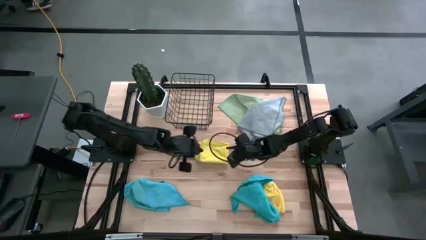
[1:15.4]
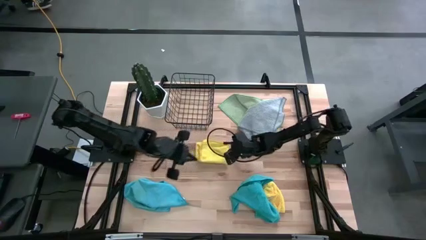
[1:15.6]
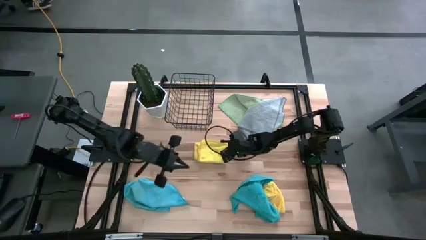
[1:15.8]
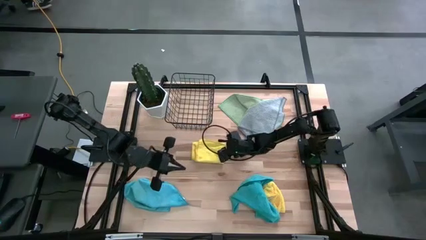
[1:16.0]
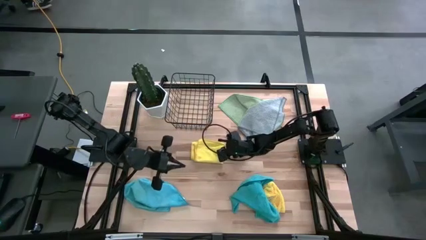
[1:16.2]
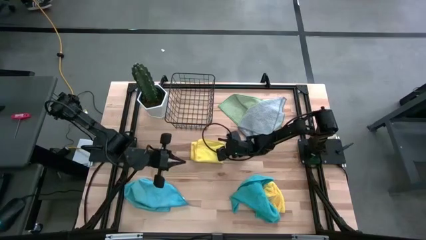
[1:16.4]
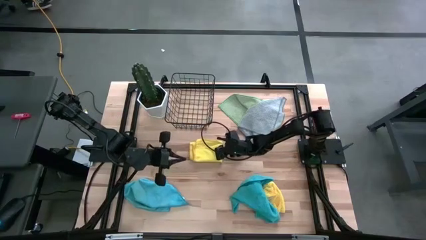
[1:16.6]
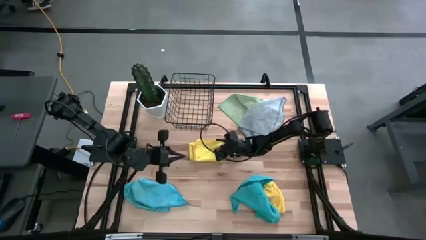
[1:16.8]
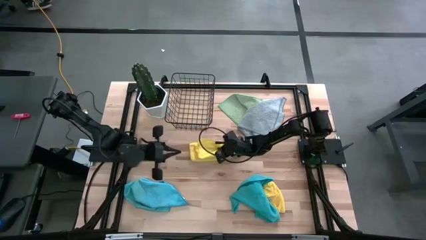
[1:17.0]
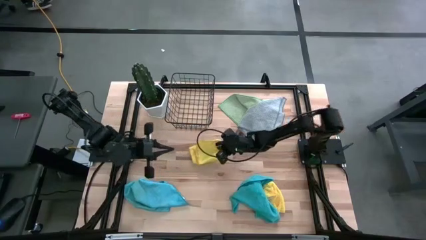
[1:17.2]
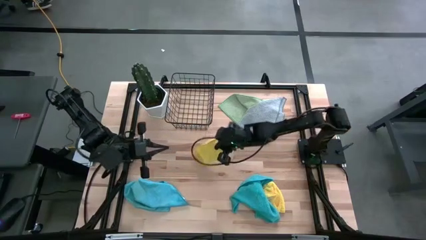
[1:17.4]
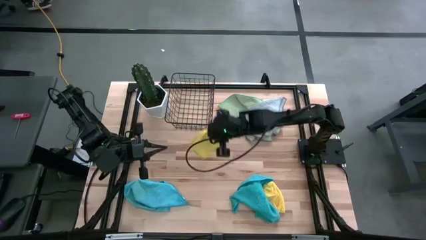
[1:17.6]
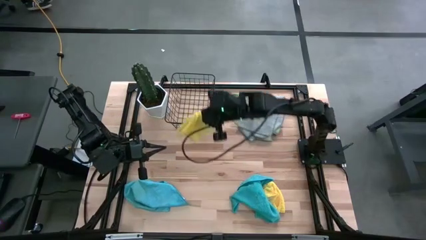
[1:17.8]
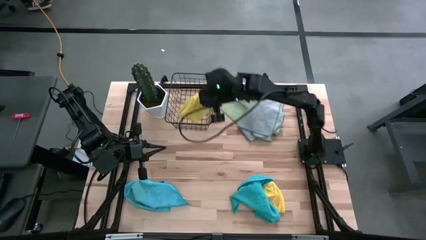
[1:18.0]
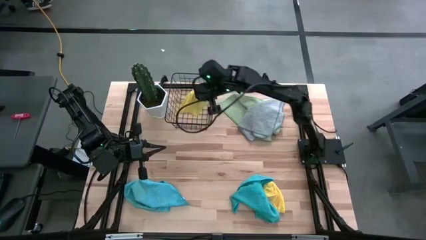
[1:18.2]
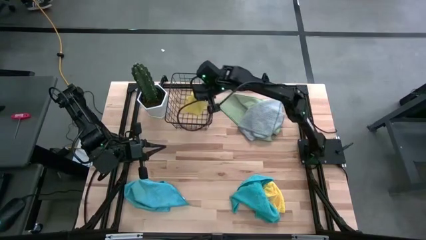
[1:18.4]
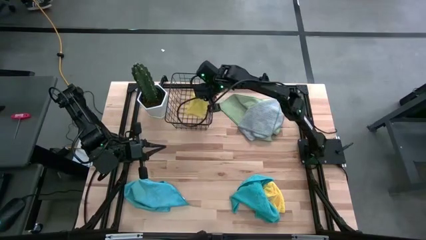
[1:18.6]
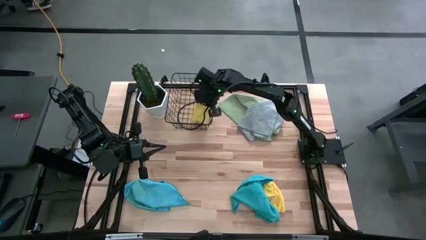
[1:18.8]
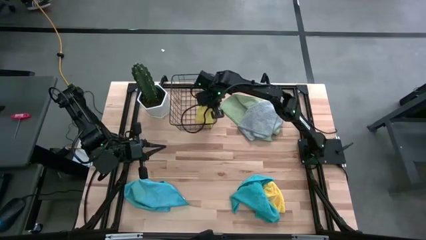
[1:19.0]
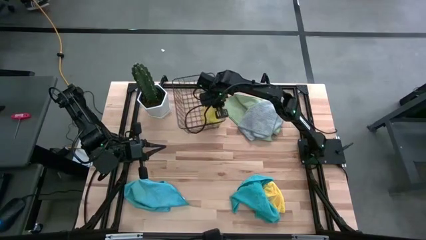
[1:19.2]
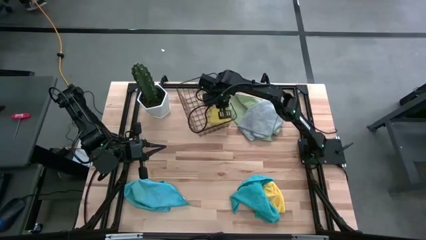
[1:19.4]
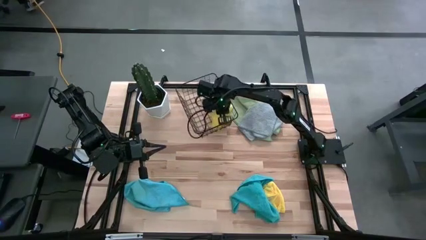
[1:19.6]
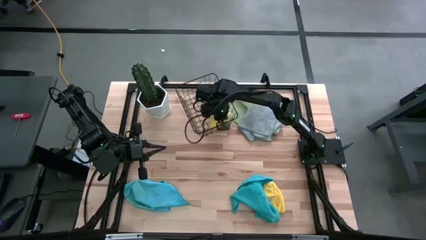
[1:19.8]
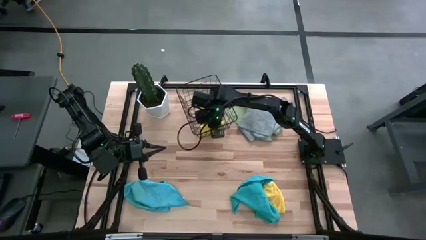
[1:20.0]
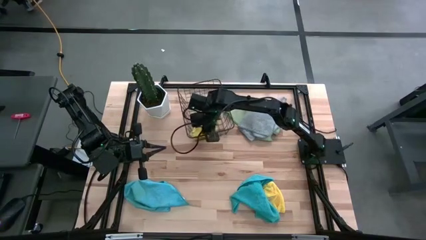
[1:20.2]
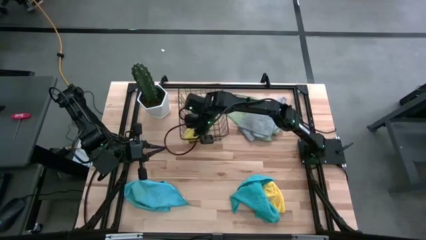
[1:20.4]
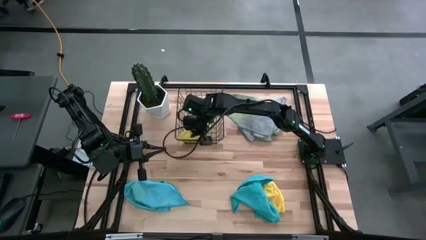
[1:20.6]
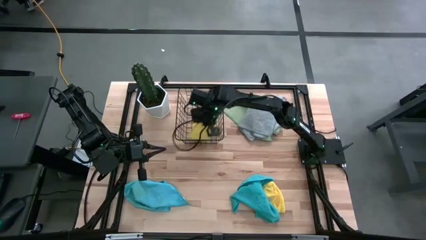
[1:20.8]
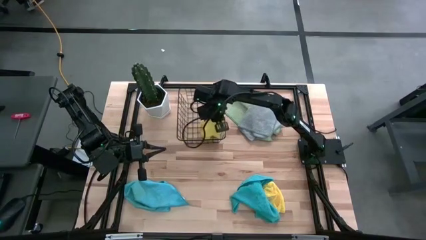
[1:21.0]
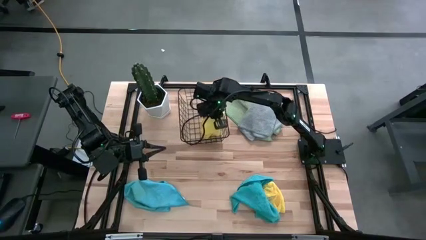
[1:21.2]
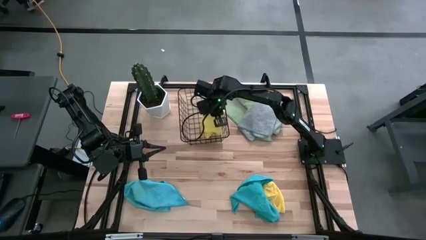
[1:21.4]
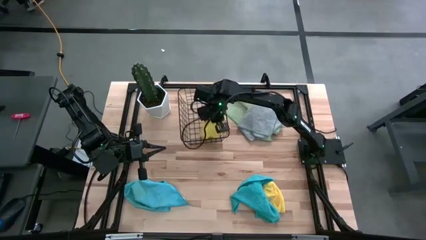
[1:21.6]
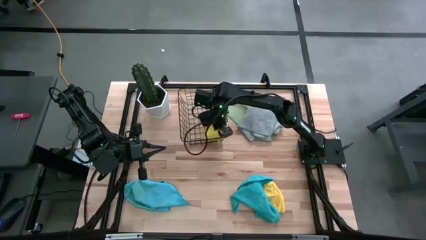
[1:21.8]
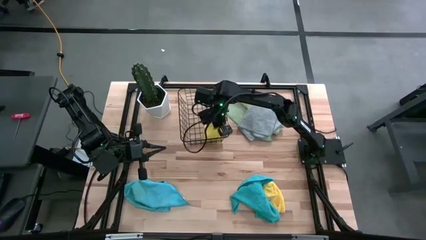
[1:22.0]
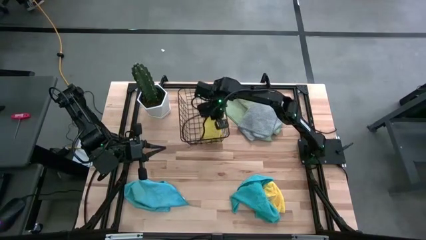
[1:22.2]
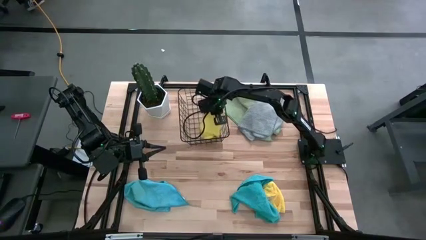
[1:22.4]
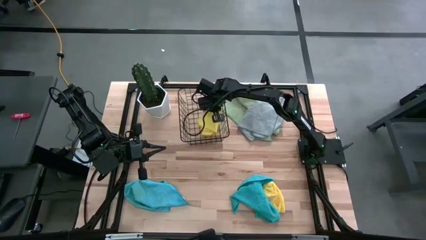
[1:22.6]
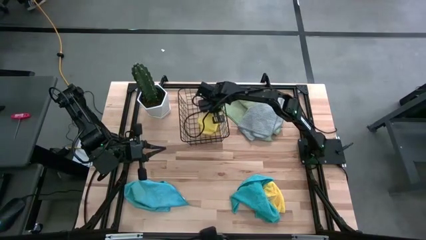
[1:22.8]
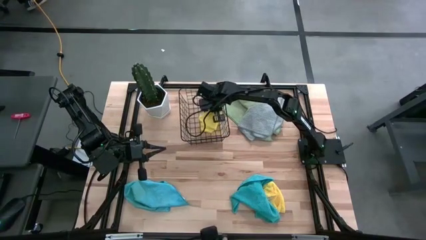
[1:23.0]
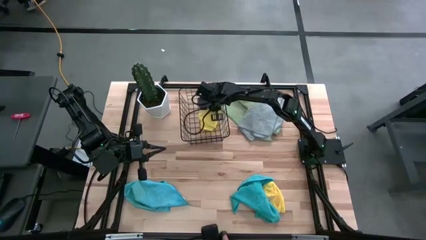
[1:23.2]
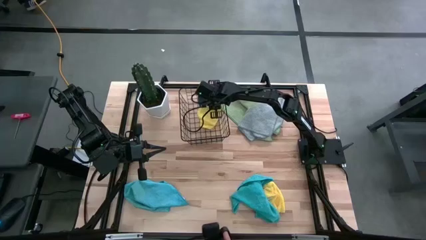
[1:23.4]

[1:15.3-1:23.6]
Task: Fold microfiber towels
Put the left yellow microfiber cloth into the black wire basket

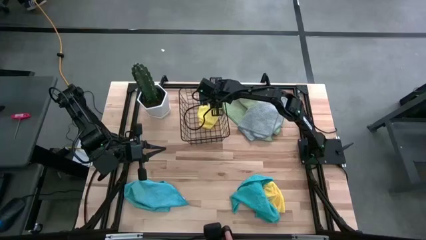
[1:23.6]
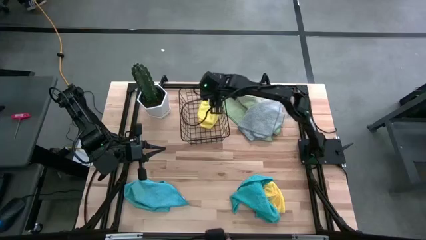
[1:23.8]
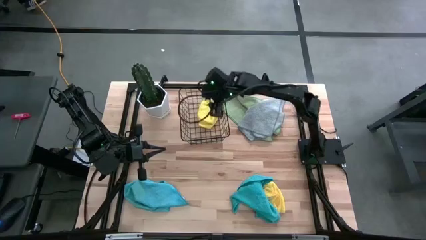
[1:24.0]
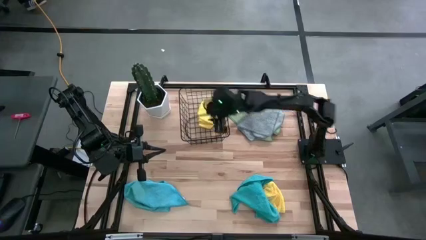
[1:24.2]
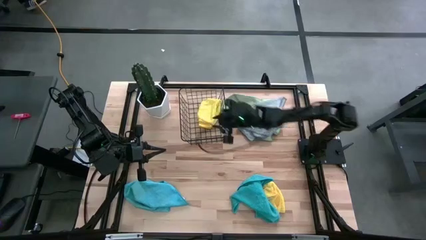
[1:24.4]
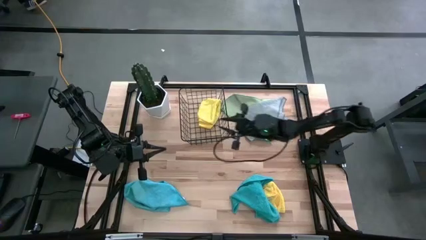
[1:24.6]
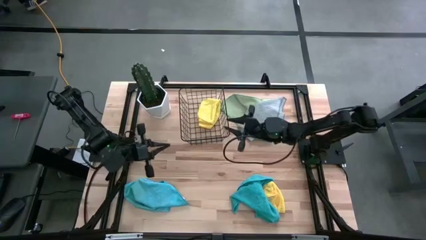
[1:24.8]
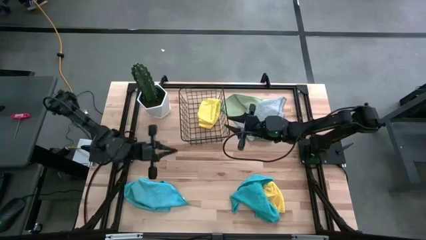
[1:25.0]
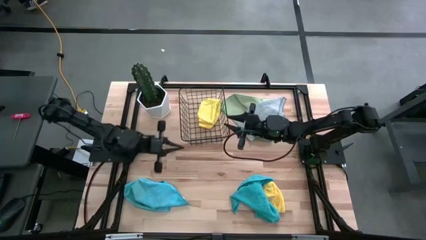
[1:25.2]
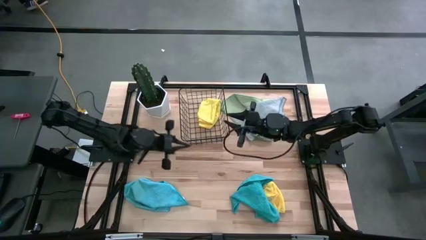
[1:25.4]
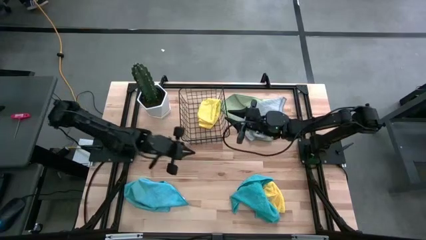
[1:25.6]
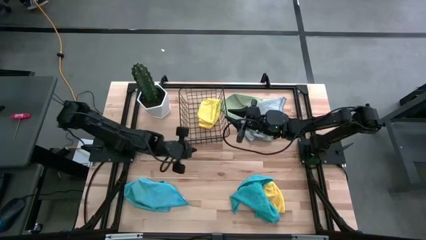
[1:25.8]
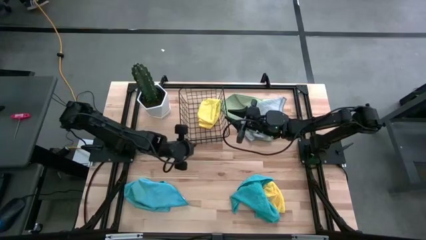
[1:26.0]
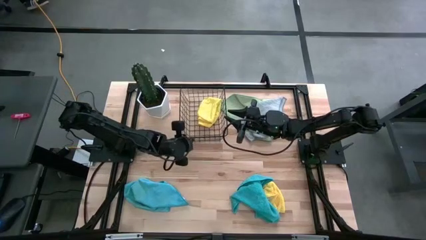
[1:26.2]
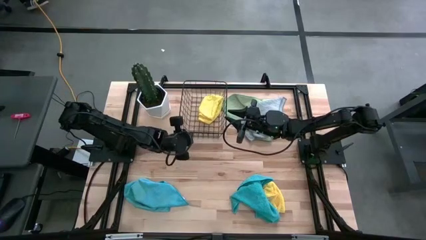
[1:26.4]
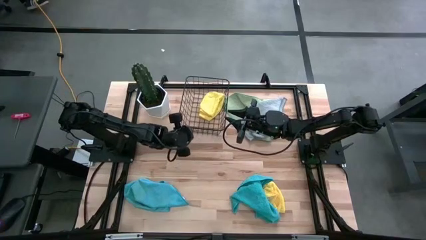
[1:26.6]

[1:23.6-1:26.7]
Adjust the black wire basket

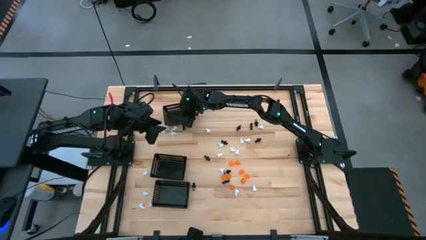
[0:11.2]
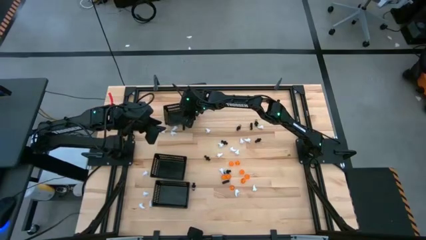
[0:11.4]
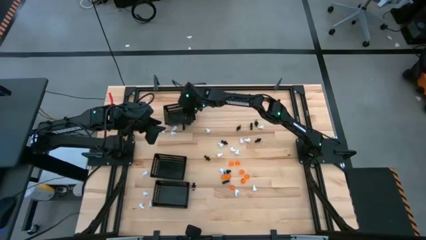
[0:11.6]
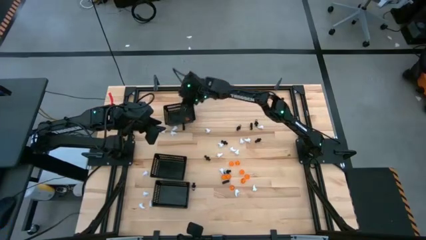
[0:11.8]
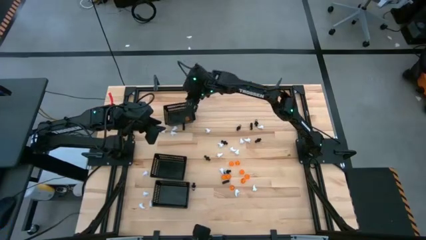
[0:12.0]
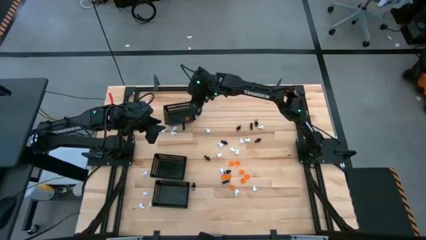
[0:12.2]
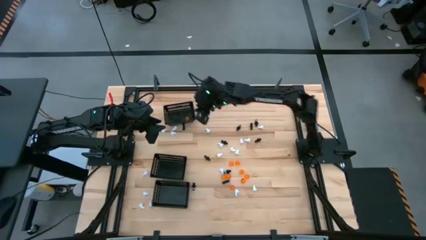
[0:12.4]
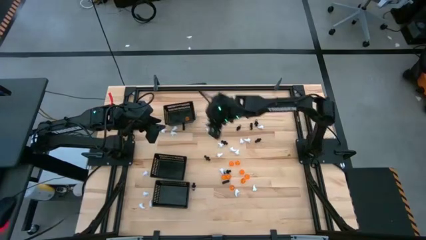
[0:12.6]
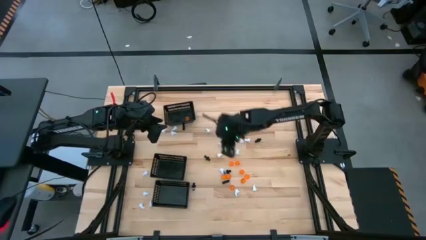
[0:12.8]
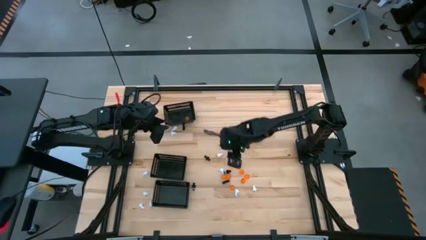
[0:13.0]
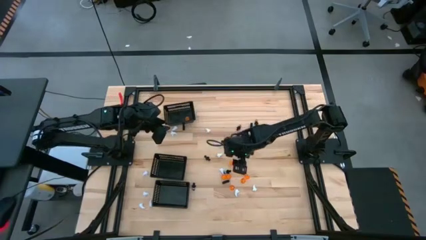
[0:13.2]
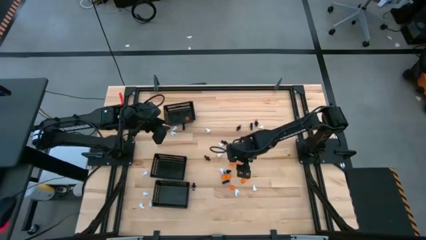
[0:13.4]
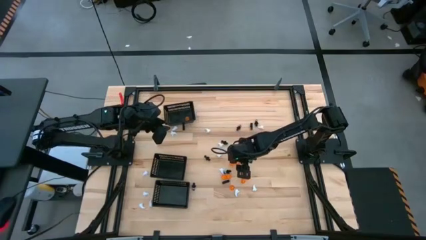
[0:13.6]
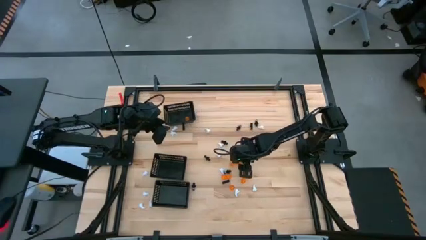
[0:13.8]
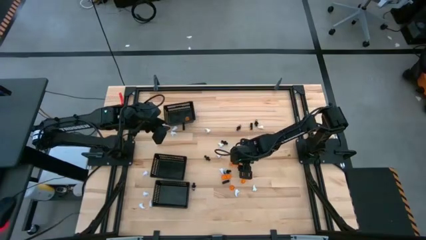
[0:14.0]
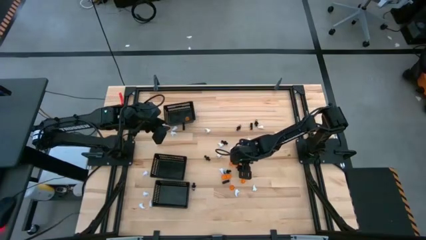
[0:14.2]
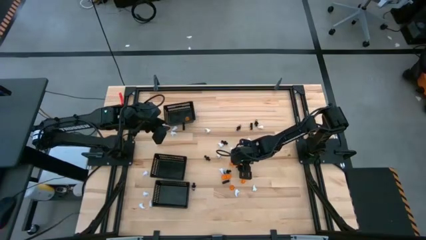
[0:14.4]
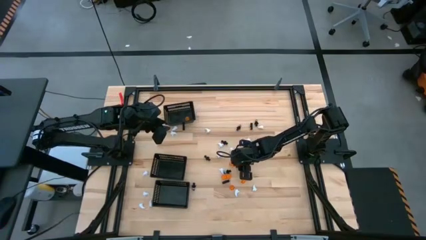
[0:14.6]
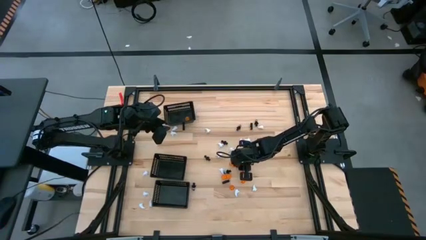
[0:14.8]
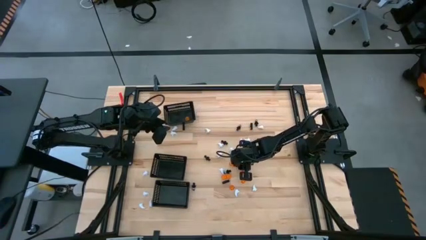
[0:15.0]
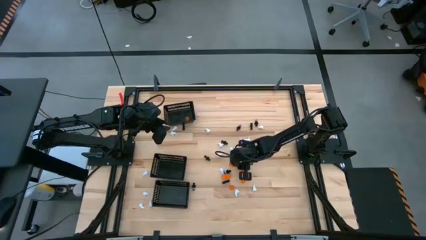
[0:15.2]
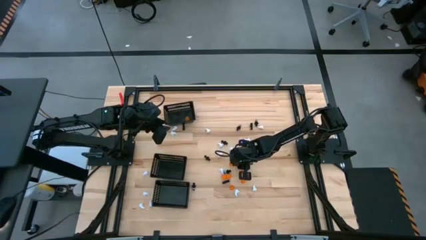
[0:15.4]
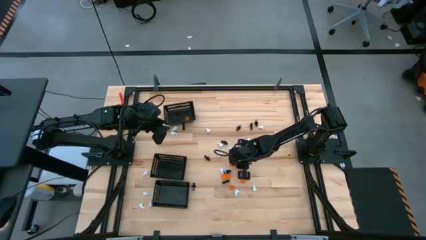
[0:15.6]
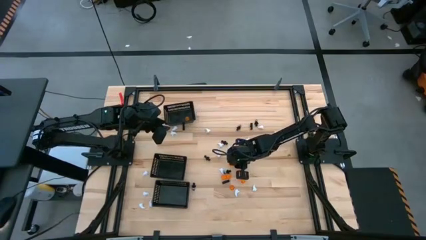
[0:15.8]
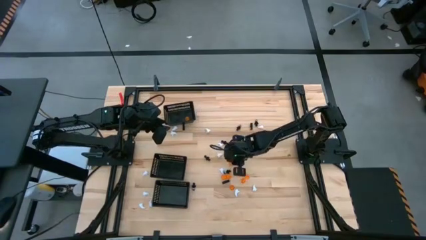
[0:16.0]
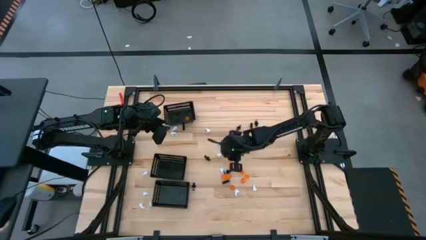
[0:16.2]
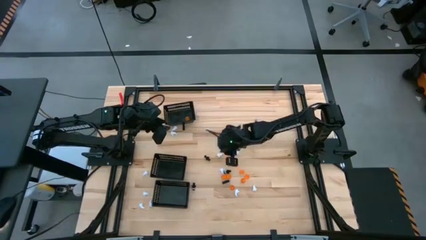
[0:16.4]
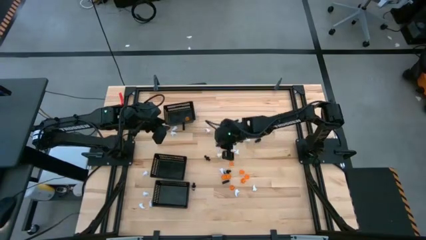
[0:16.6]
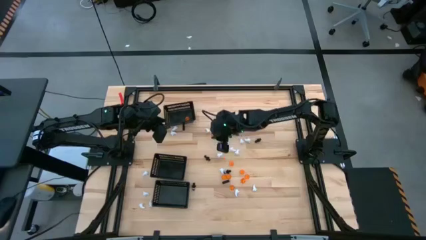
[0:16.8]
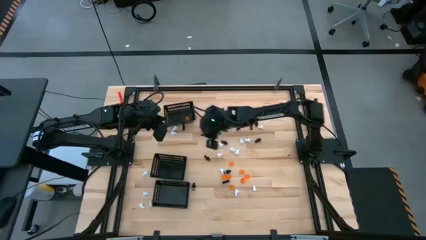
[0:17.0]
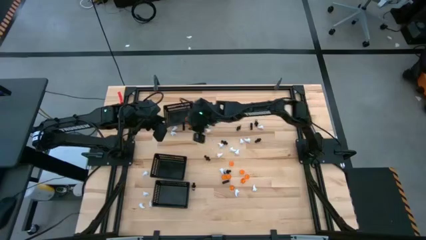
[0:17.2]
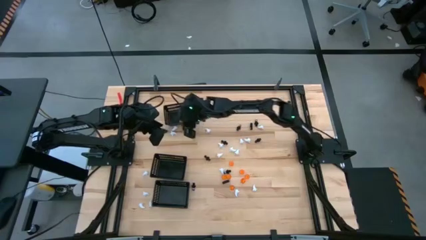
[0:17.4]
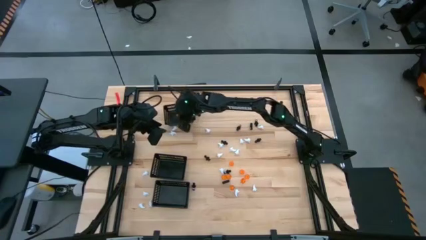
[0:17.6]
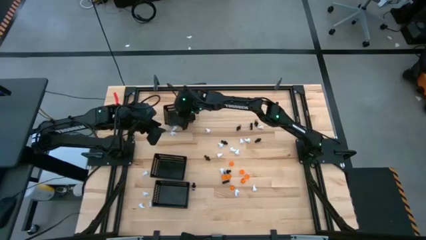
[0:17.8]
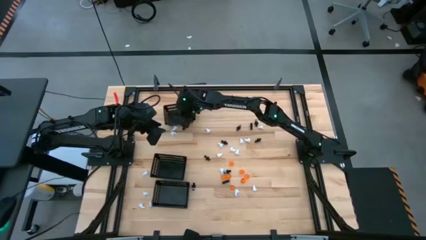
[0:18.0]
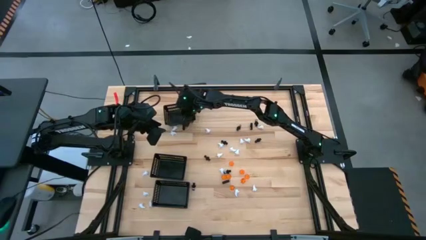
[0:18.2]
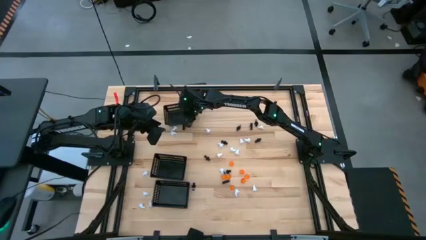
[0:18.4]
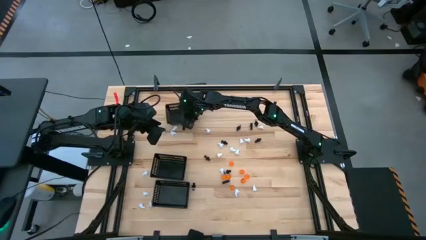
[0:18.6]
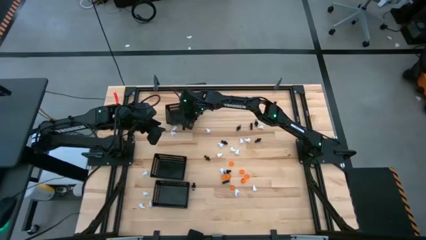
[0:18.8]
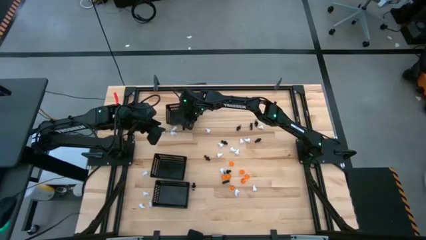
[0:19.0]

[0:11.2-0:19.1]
Task: Sort Halloween decoration
Put the orange pumpkin toy into the top black bin
